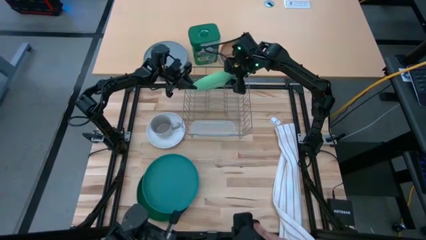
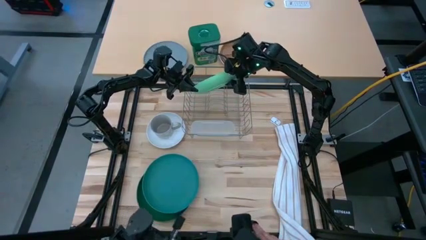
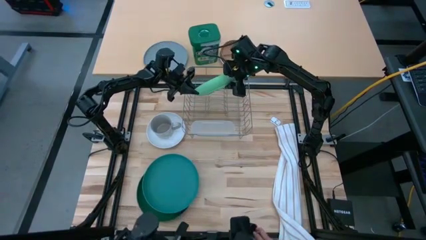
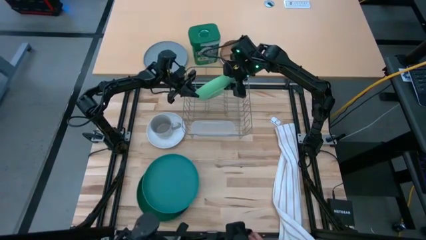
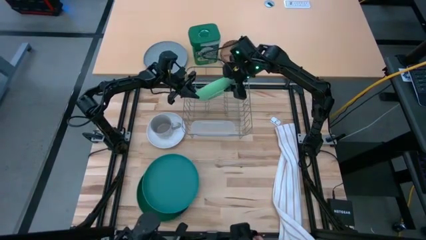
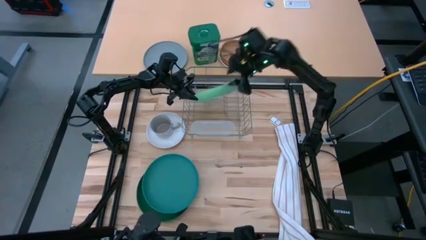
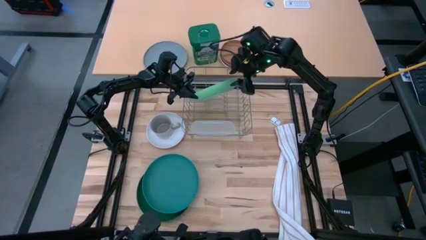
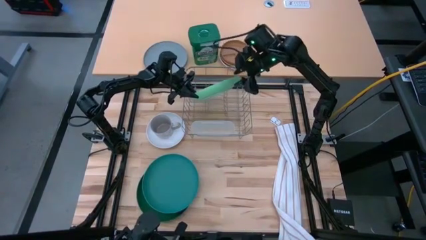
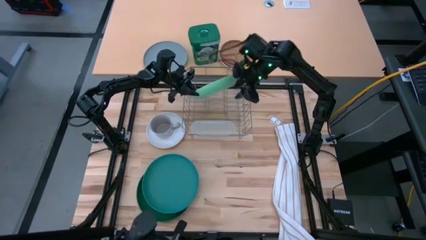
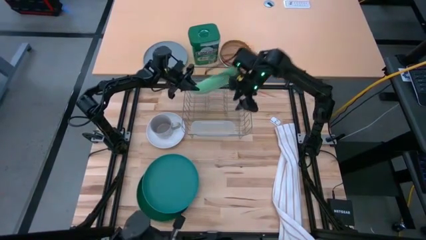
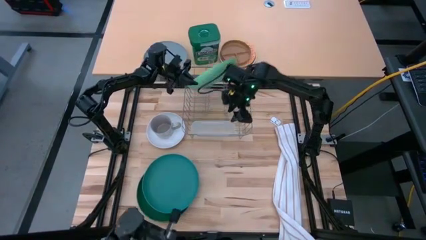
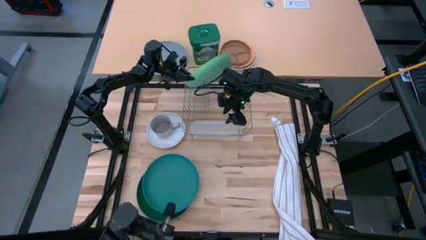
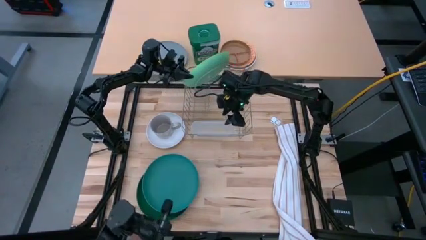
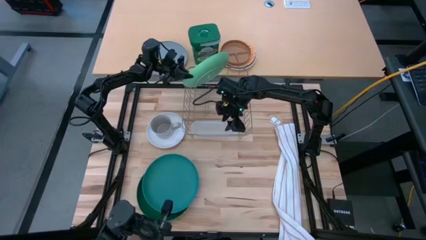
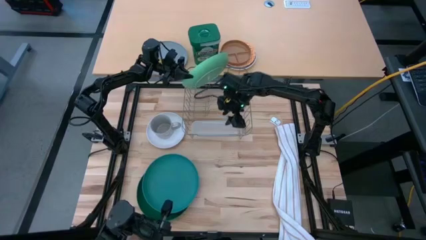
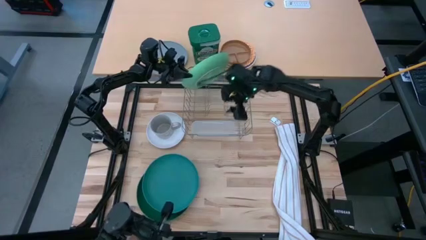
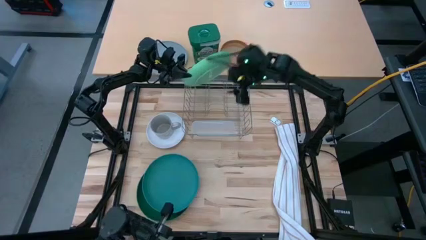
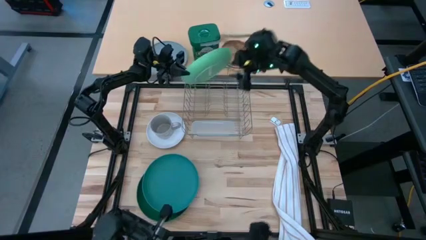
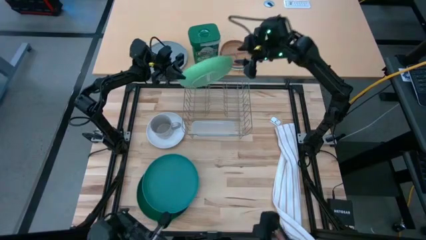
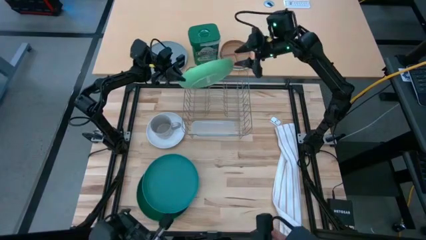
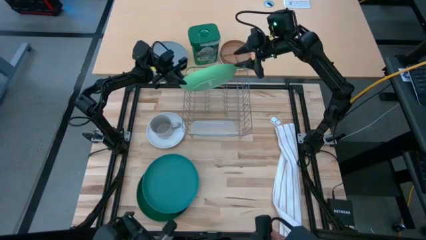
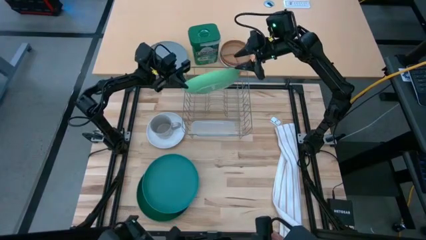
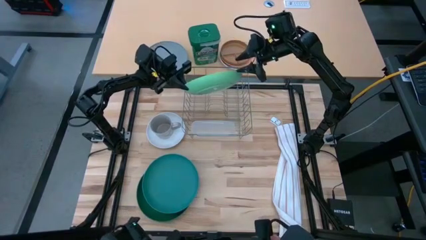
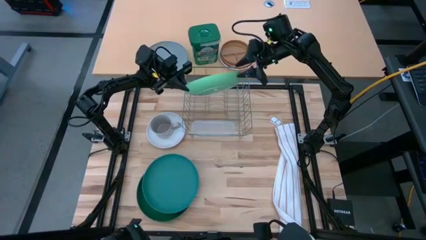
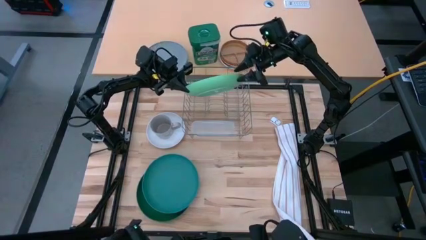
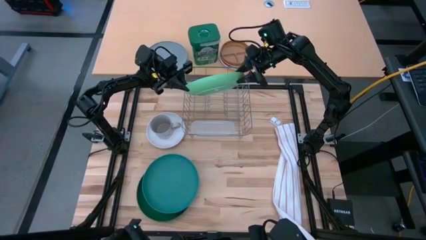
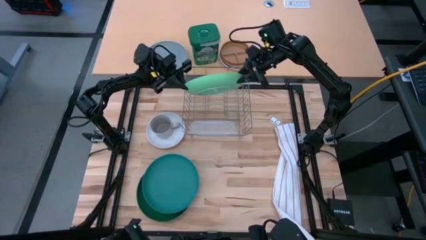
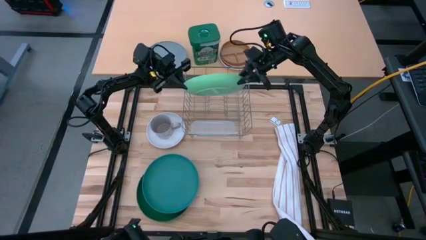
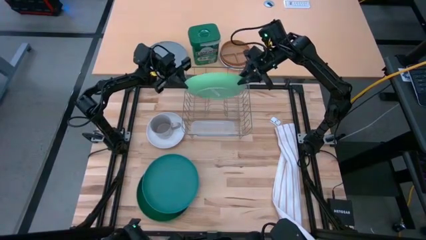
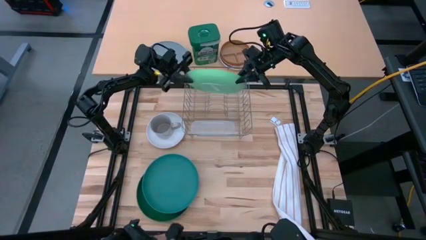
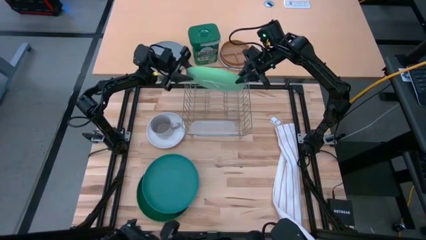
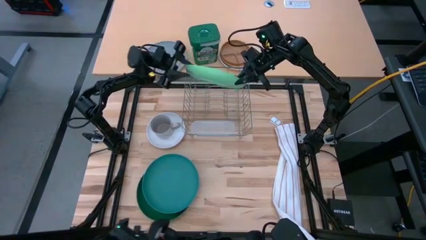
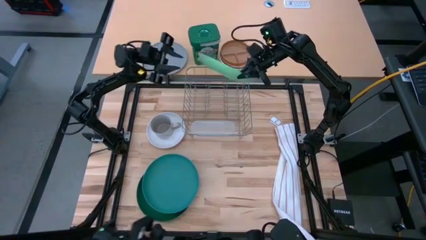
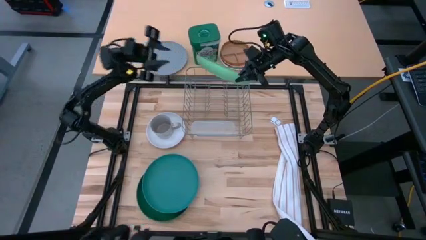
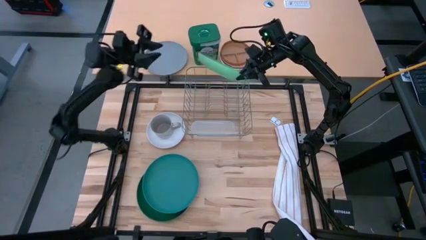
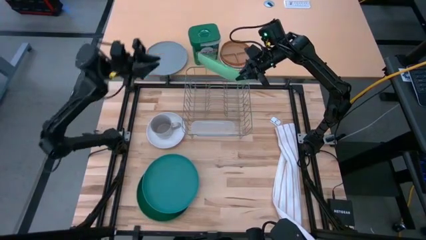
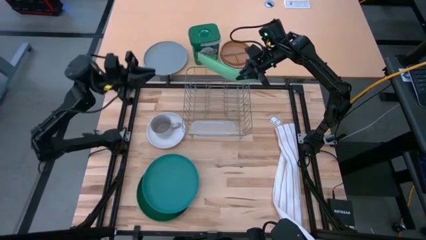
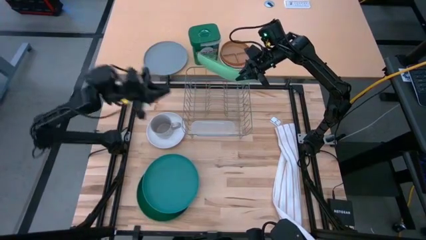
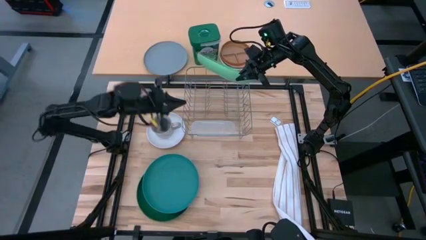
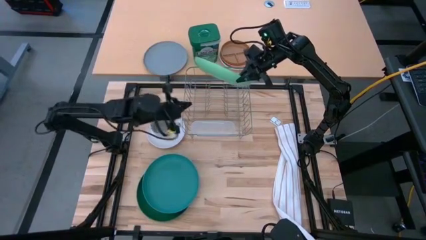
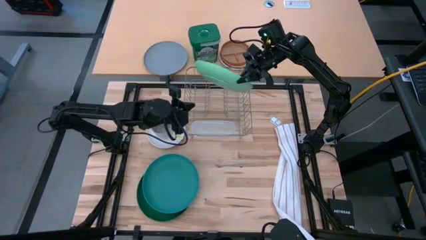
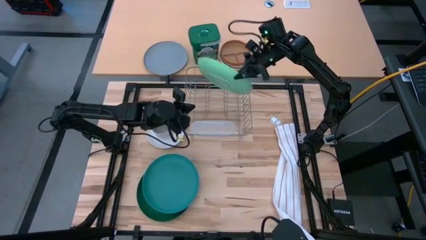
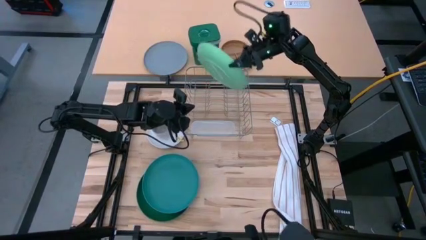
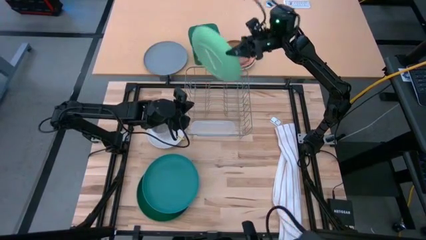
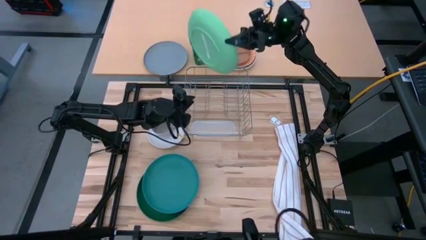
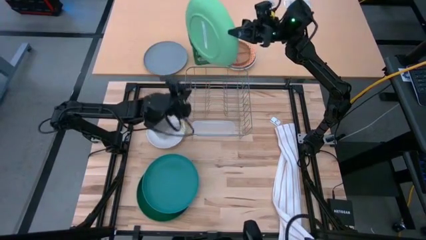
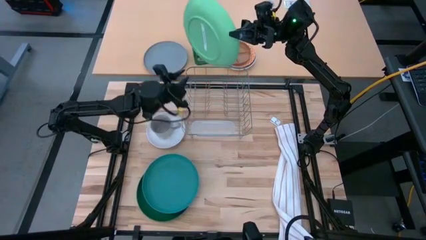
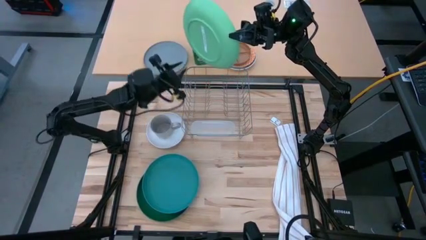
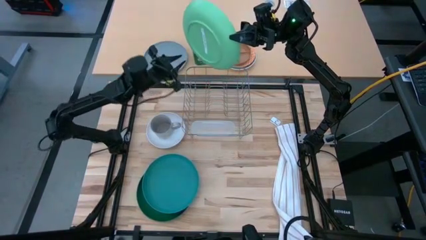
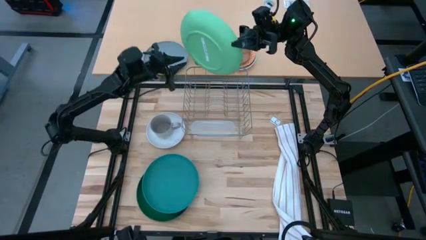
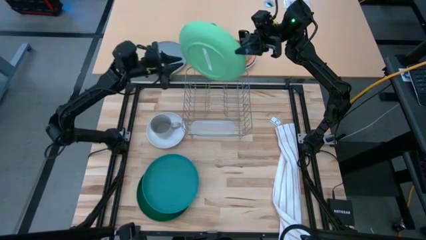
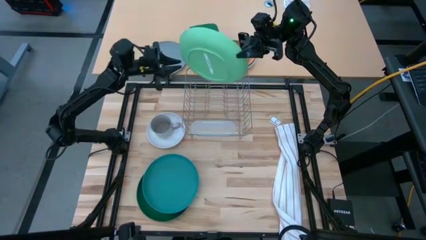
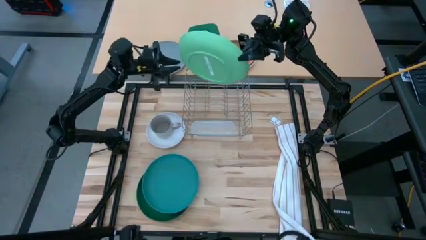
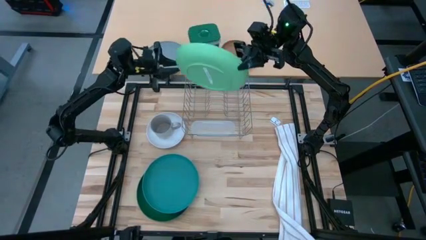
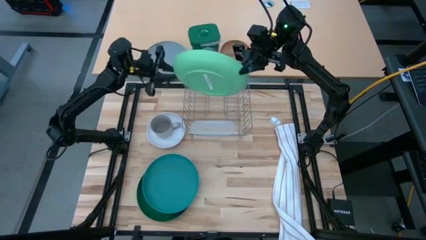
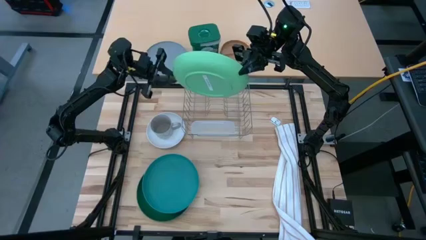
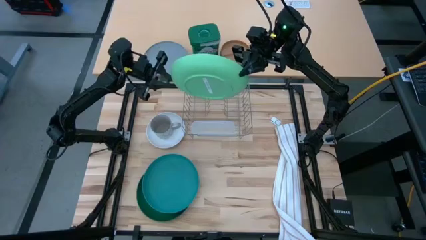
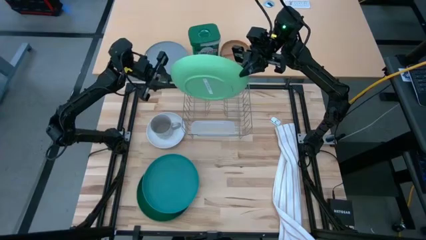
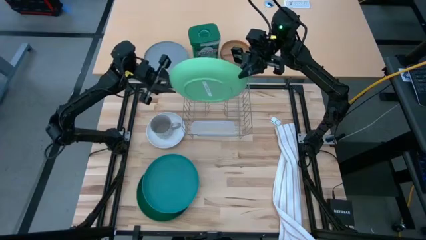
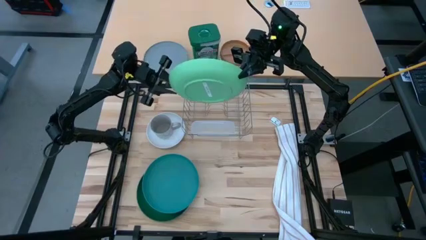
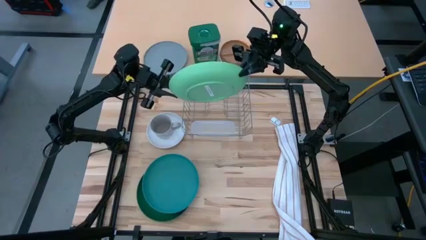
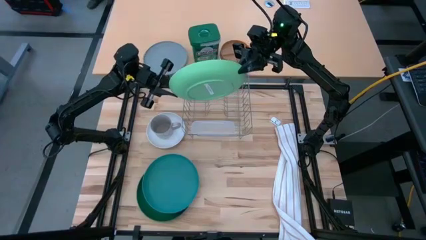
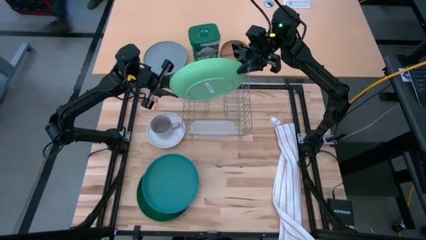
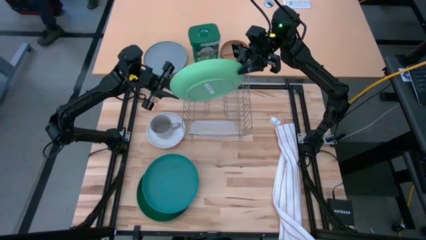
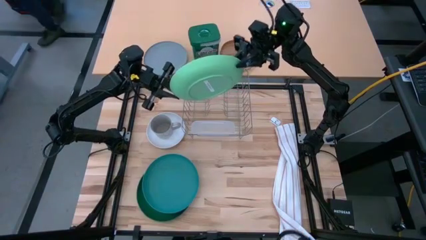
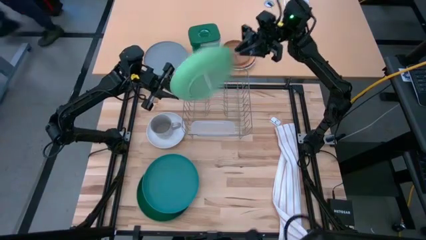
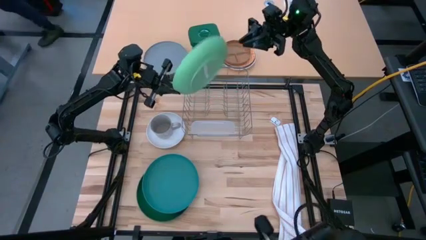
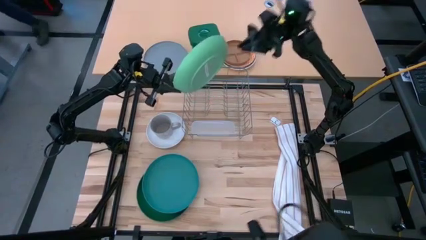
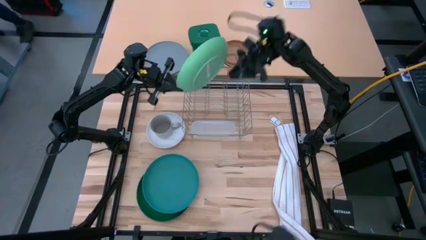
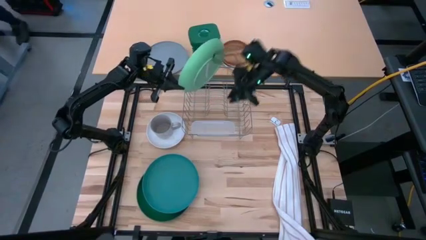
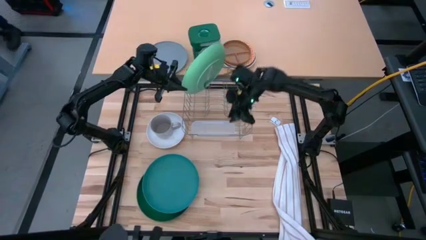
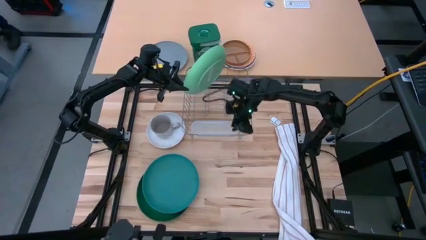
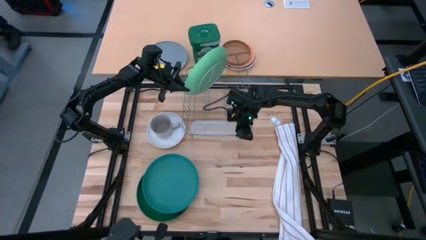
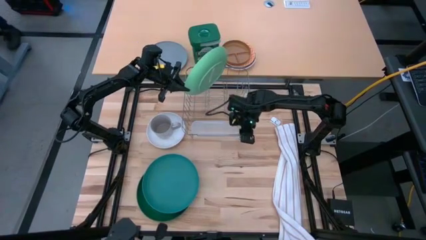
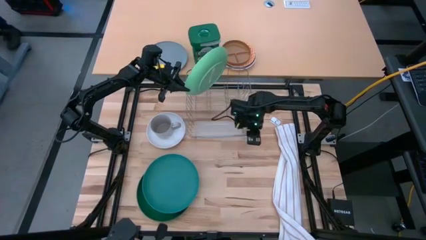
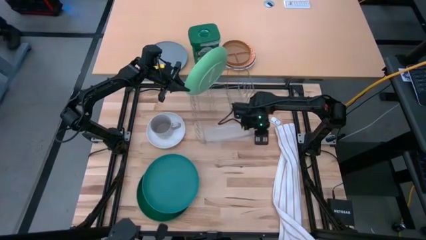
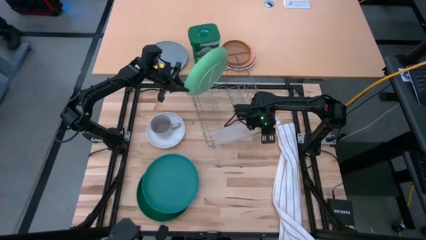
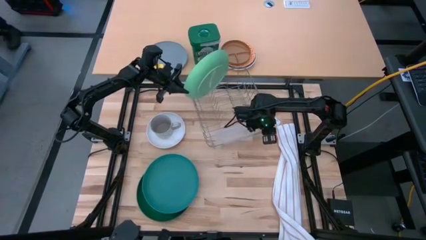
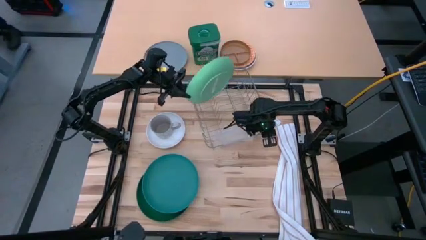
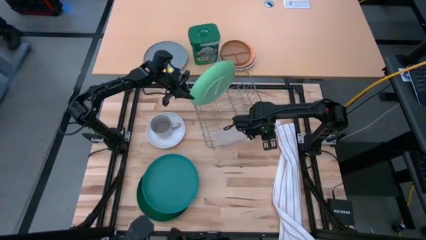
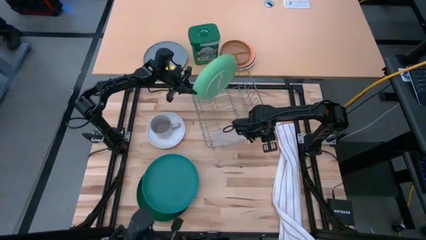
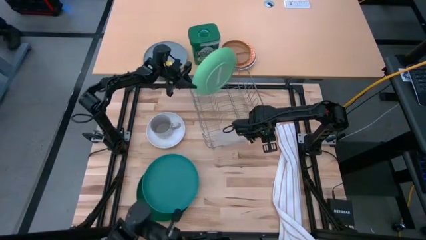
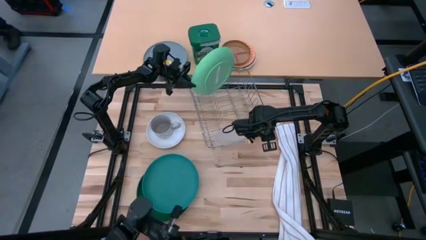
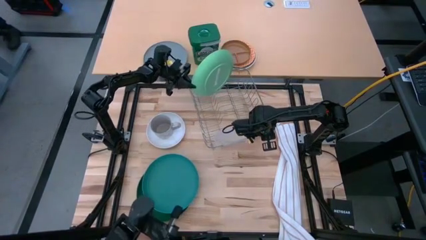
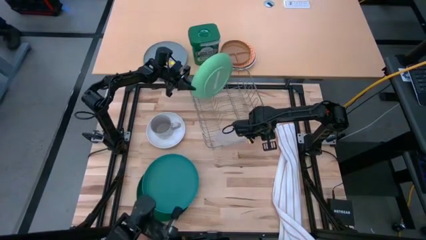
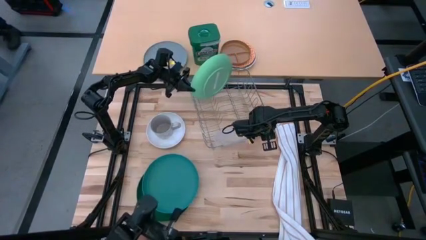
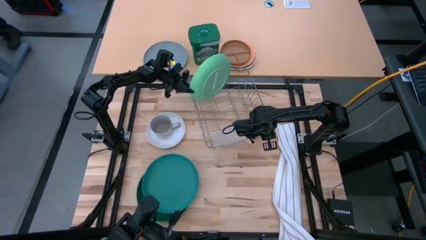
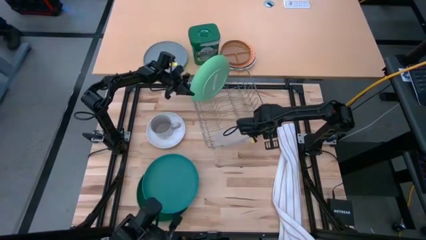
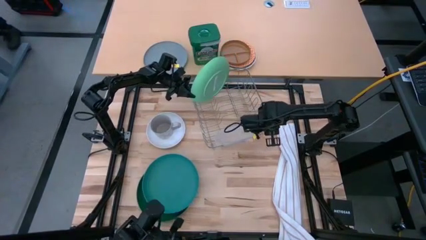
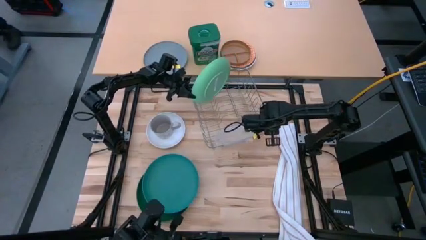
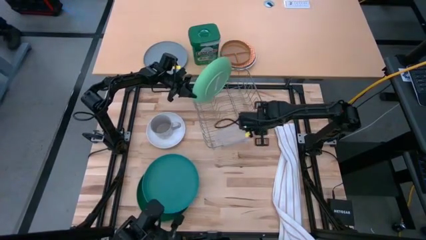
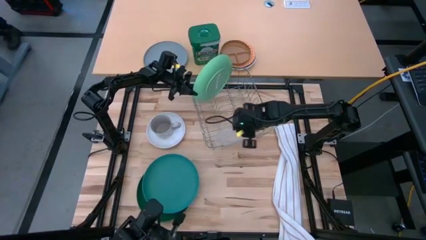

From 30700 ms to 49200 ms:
Task: Sort dishes
Put the light green plate into the dish rack
